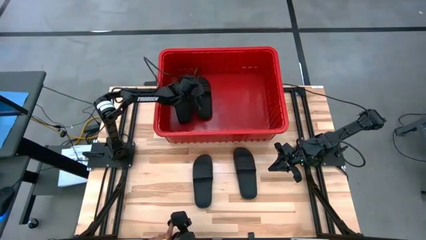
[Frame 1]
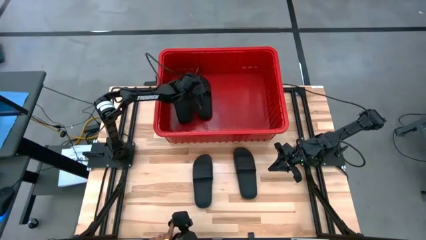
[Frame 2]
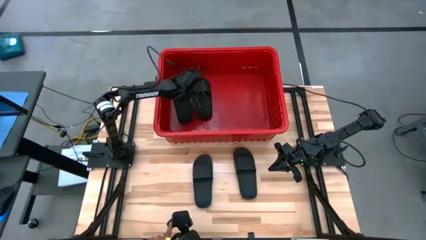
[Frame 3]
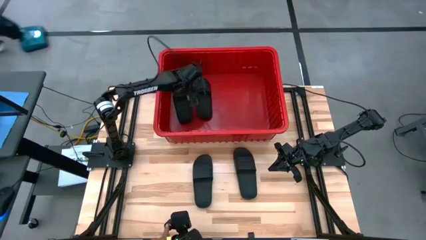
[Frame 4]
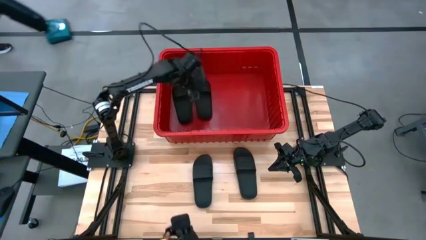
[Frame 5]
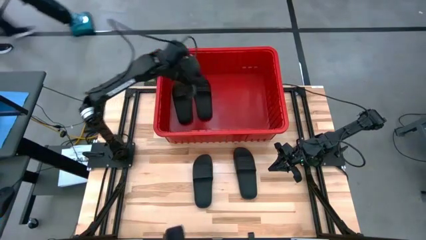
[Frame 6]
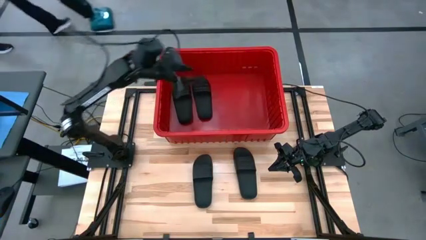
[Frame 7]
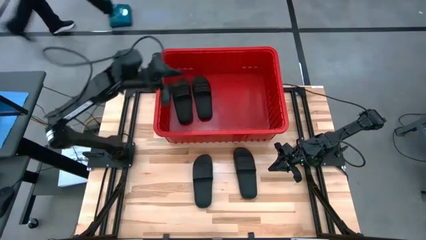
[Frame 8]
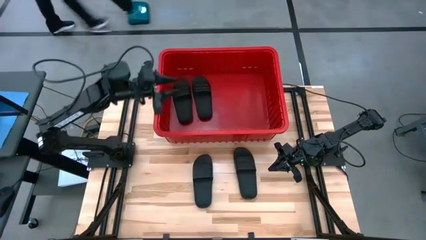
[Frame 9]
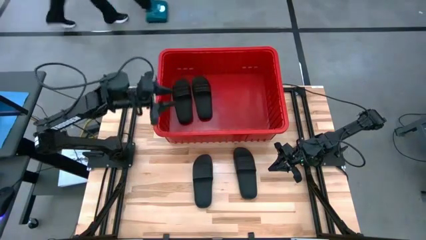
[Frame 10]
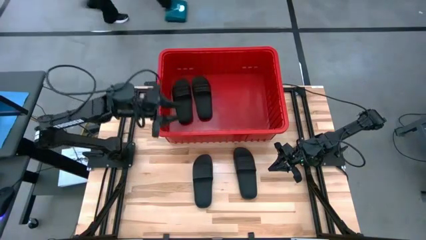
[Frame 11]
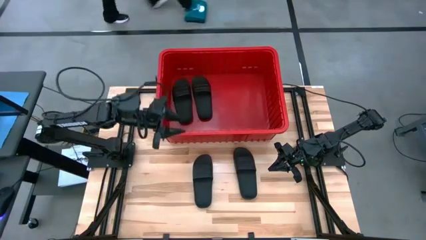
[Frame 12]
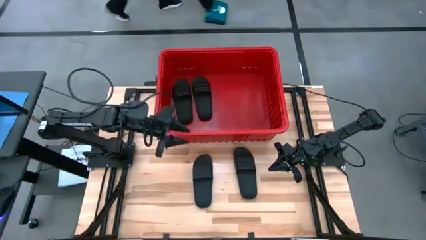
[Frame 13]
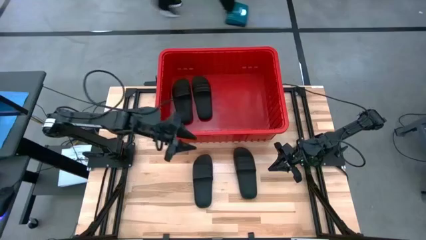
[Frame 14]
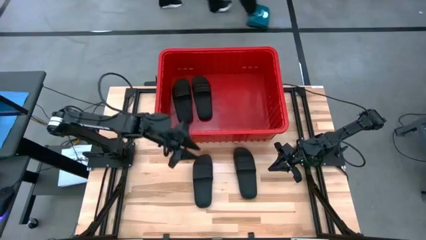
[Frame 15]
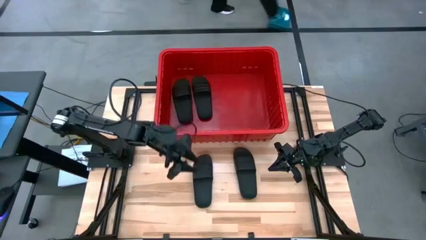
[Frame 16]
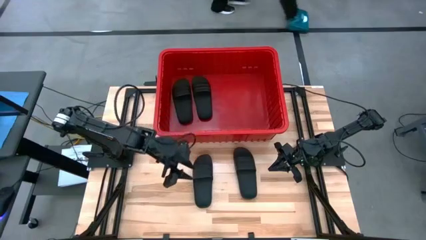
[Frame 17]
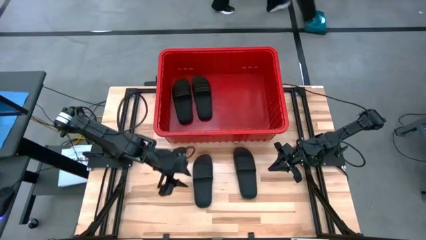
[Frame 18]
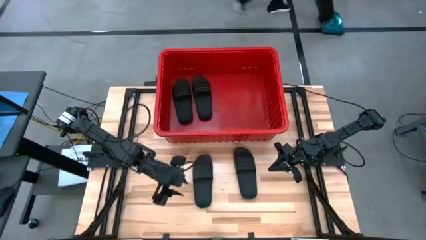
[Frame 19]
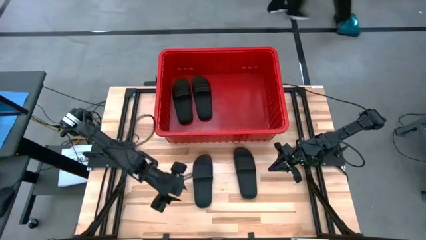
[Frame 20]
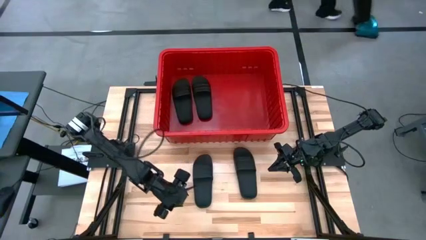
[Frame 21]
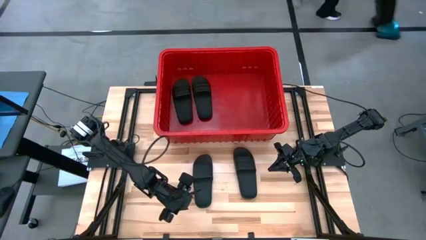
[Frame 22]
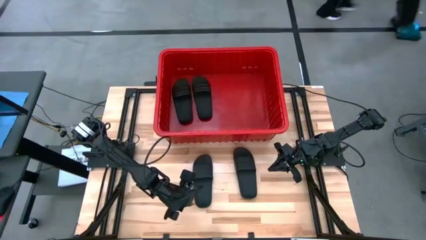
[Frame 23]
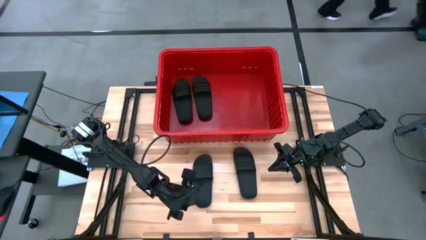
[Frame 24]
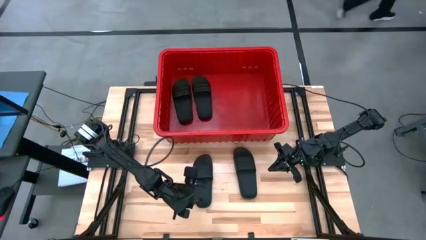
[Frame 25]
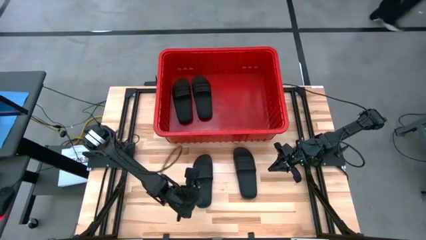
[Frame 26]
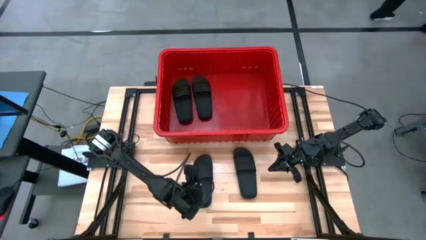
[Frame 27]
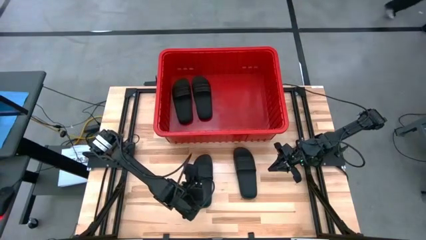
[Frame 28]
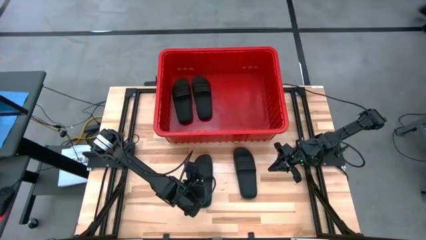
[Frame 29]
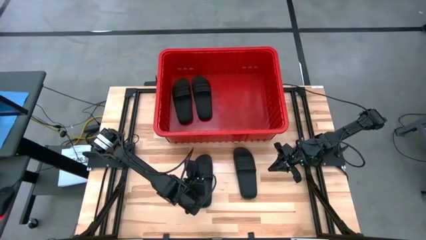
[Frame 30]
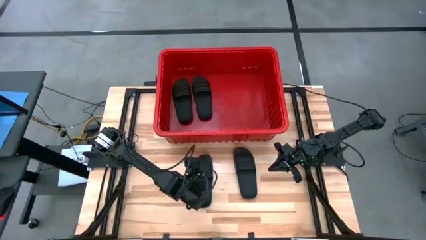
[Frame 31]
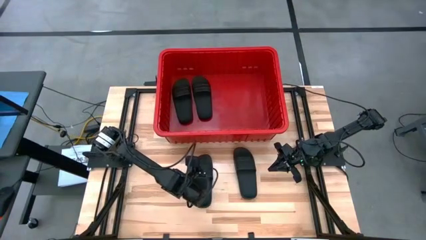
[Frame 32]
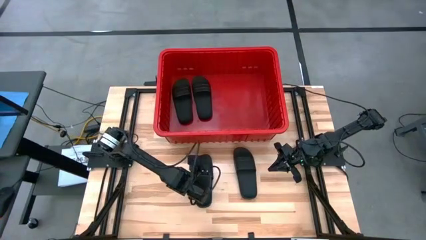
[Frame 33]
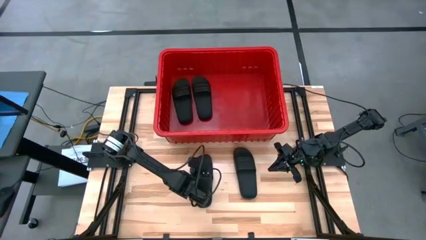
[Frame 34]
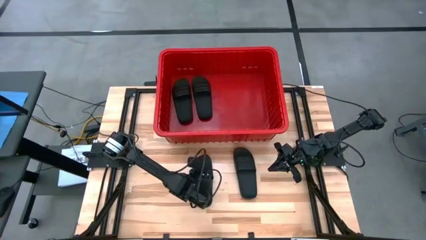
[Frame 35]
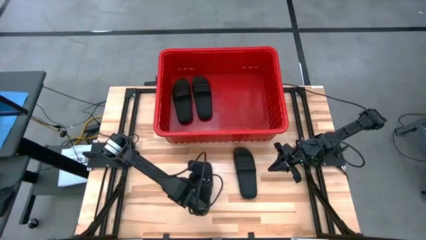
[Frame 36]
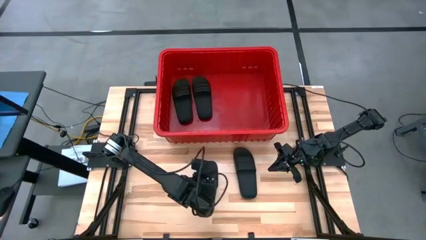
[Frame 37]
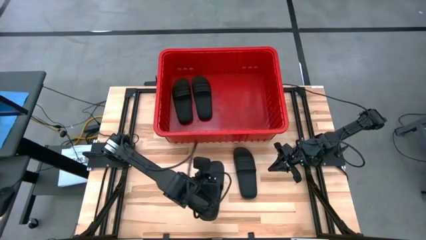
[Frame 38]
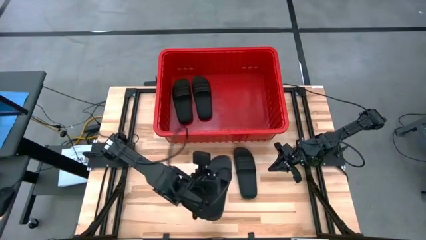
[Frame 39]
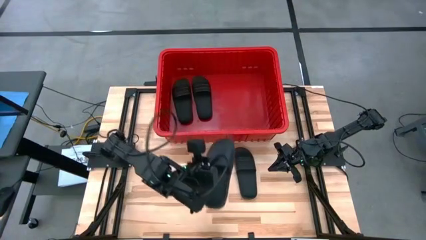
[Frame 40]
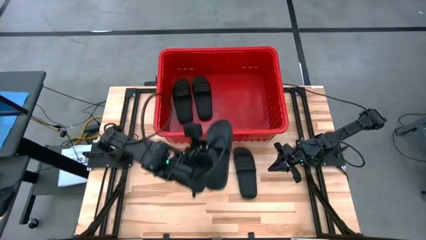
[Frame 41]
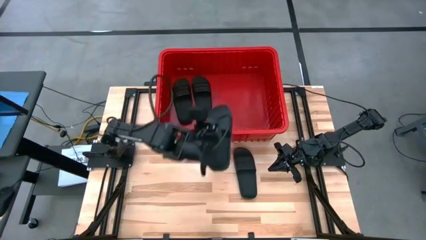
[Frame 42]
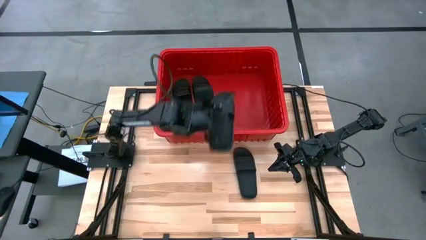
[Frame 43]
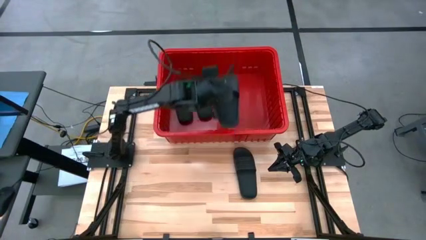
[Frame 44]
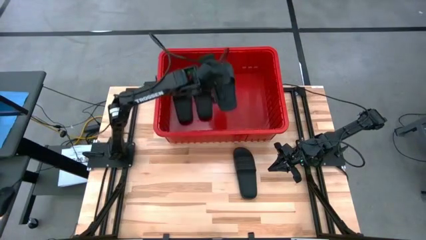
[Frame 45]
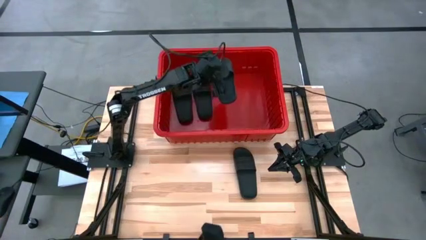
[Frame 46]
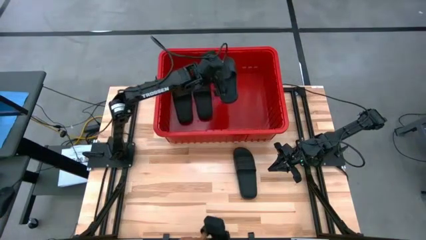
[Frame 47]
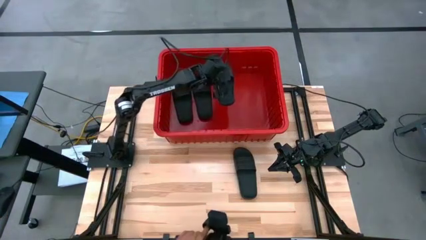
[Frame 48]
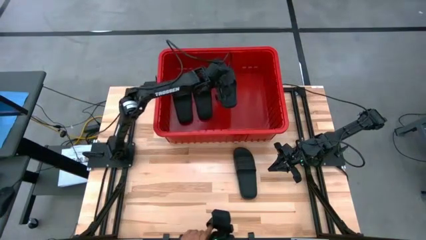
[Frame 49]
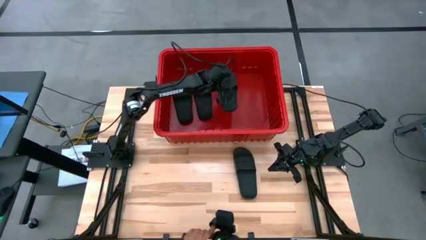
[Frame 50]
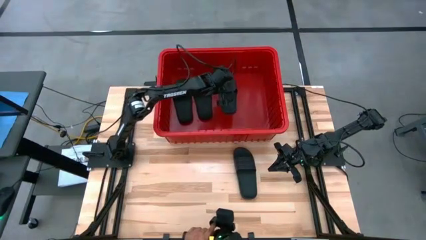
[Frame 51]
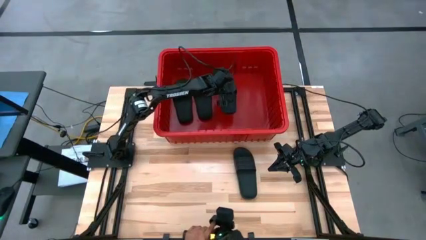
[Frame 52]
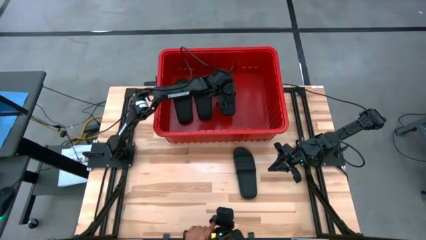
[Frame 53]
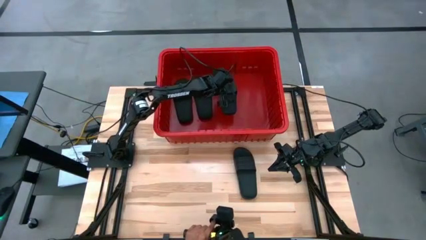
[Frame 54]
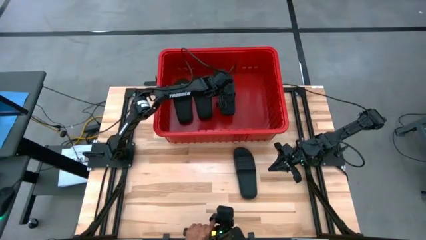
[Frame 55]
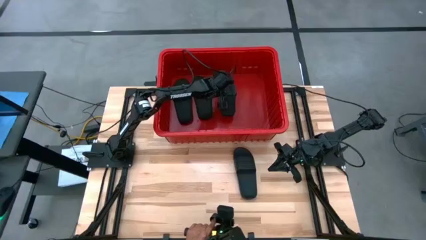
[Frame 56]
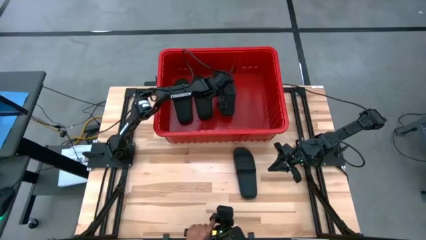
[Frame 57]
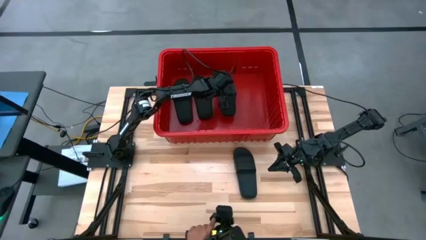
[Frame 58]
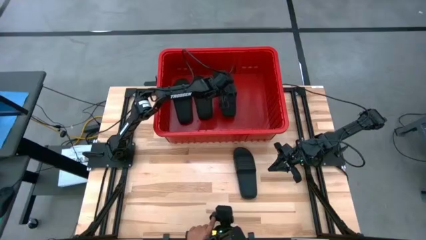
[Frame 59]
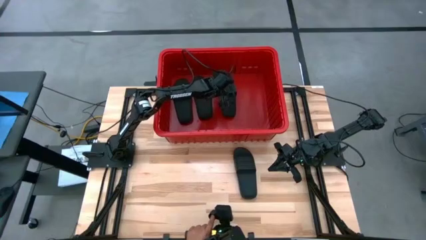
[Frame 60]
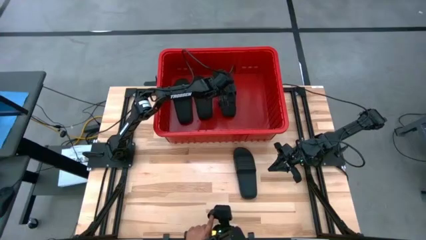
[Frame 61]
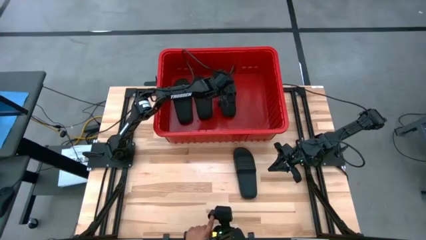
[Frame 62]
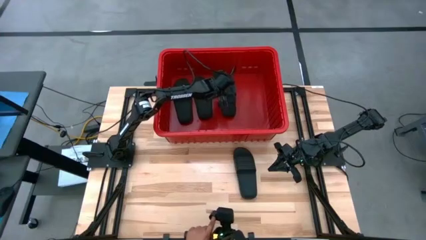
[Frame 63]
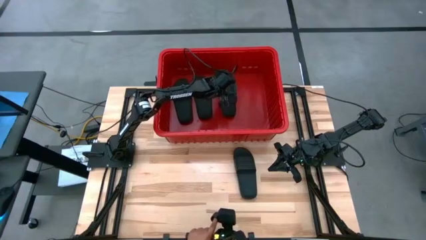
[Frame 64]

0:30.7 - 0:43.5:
Task: Pick and place slides into bin
Put the black slipper into the red bin
